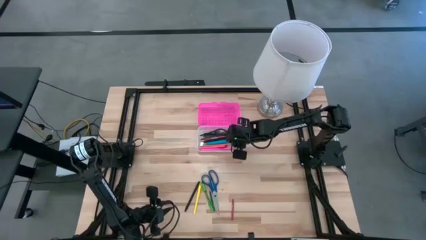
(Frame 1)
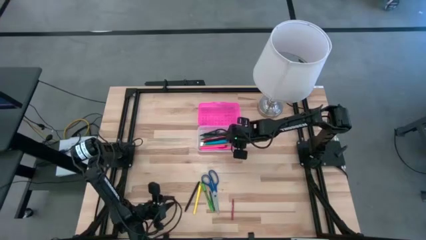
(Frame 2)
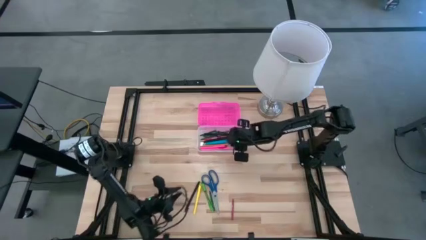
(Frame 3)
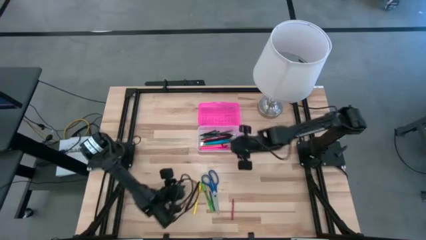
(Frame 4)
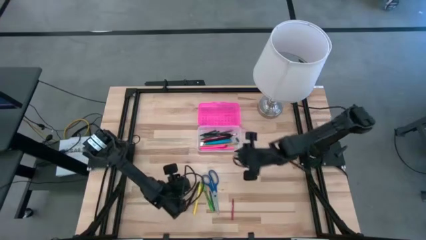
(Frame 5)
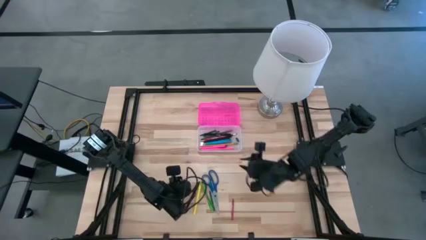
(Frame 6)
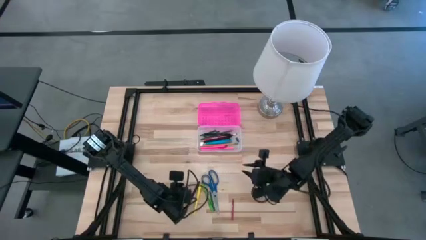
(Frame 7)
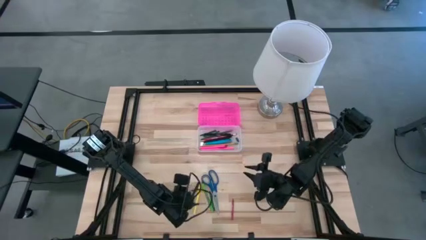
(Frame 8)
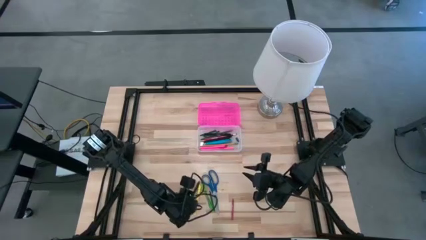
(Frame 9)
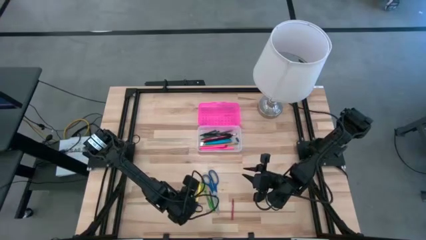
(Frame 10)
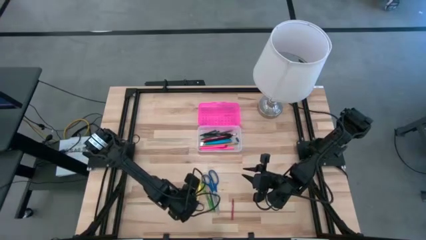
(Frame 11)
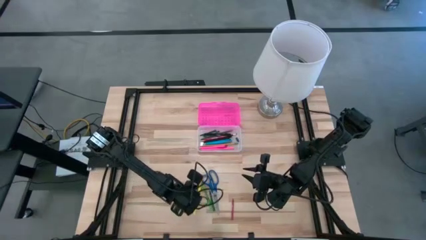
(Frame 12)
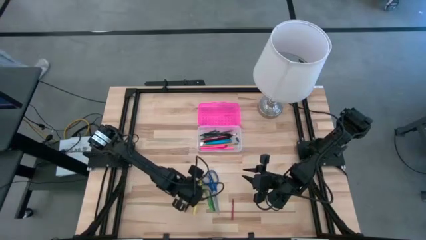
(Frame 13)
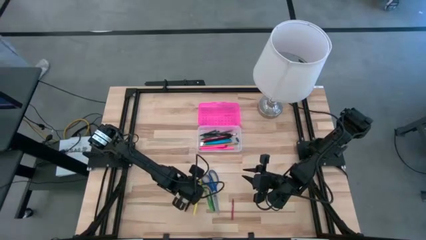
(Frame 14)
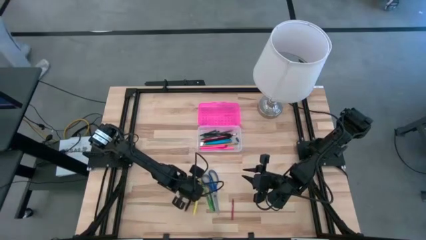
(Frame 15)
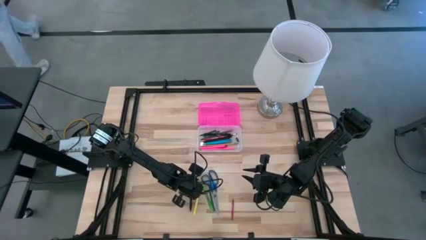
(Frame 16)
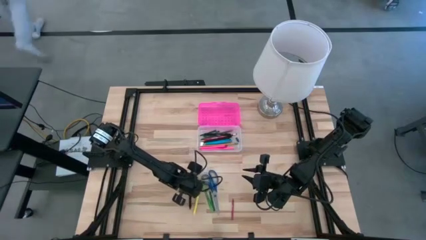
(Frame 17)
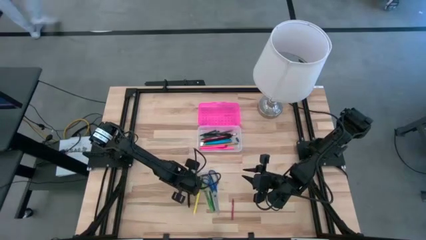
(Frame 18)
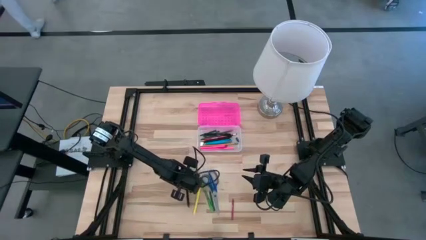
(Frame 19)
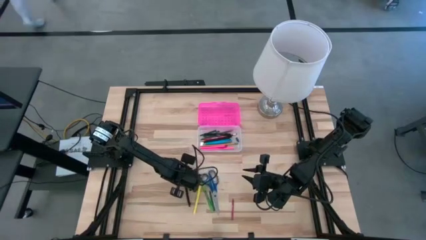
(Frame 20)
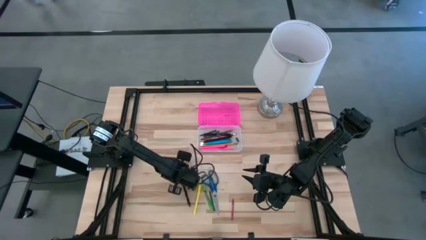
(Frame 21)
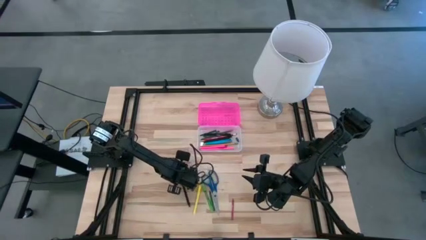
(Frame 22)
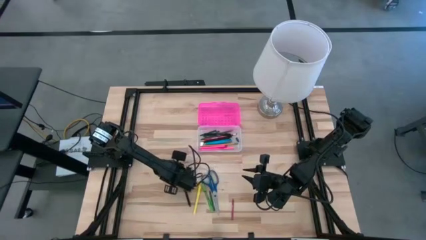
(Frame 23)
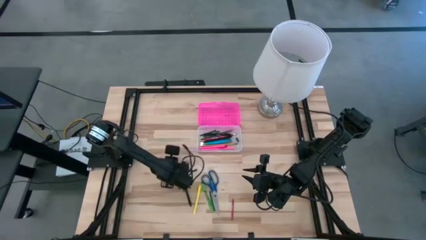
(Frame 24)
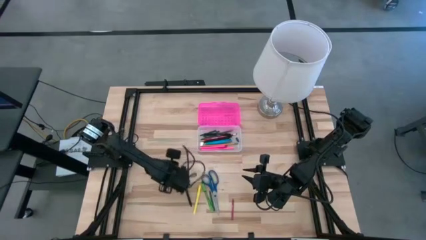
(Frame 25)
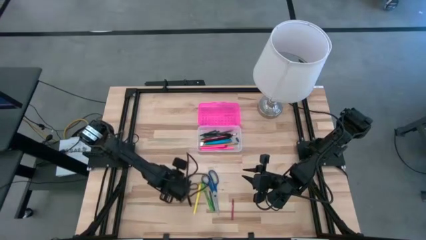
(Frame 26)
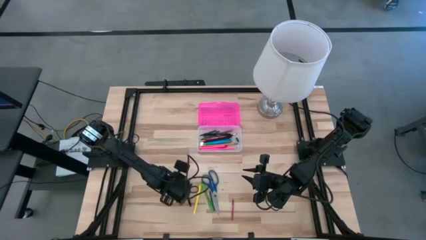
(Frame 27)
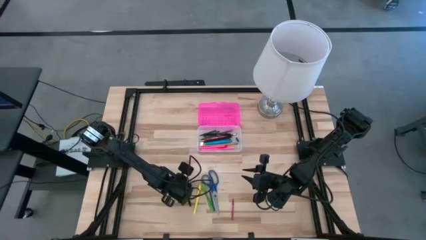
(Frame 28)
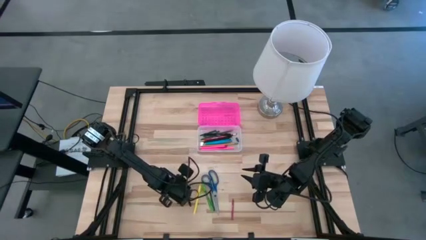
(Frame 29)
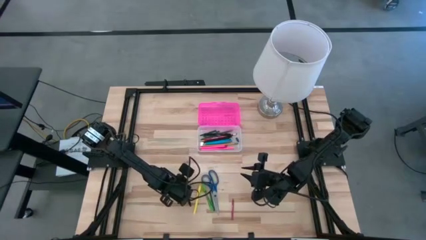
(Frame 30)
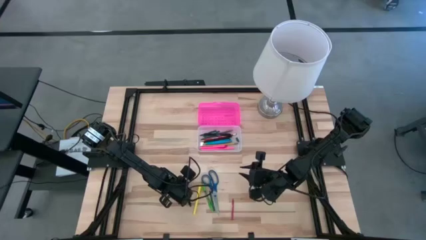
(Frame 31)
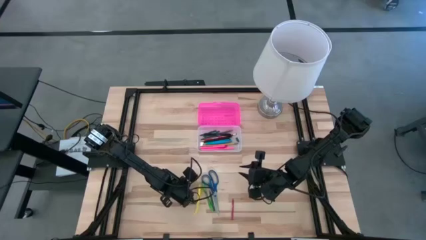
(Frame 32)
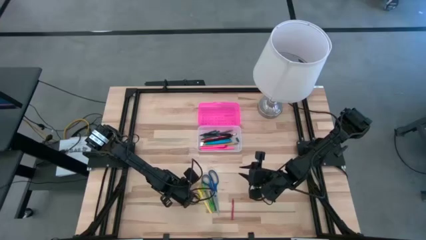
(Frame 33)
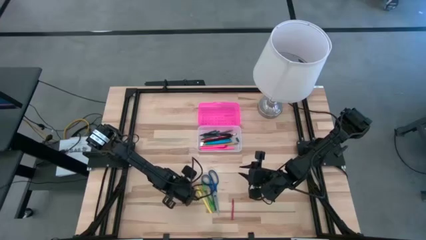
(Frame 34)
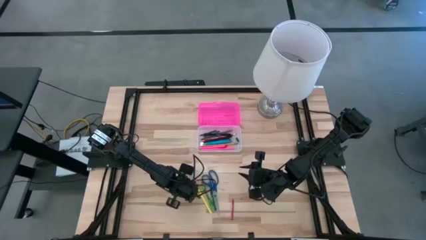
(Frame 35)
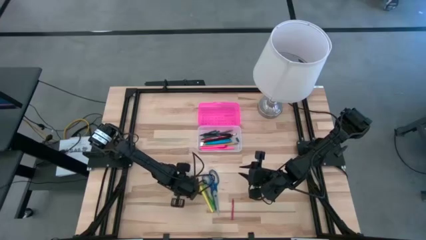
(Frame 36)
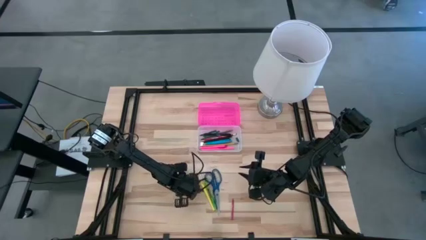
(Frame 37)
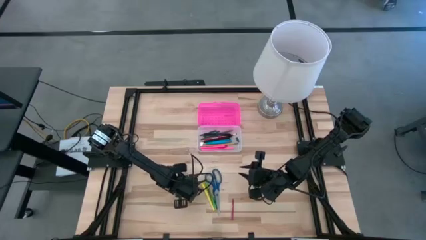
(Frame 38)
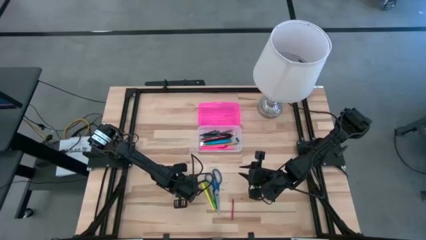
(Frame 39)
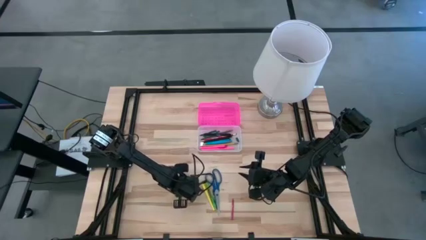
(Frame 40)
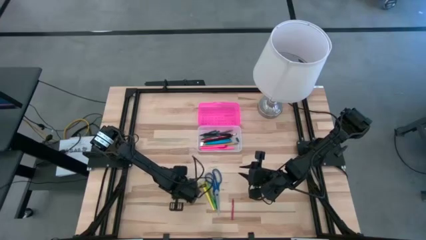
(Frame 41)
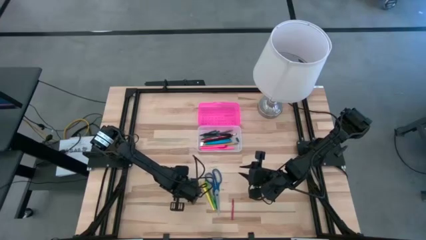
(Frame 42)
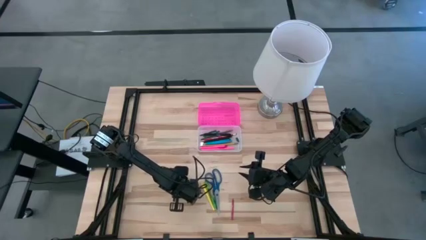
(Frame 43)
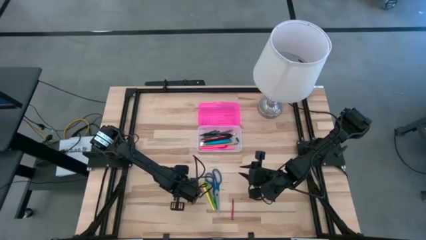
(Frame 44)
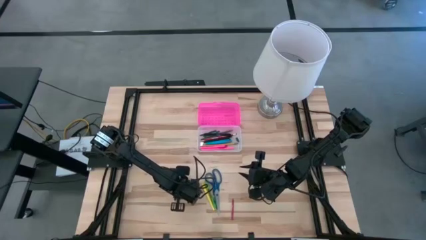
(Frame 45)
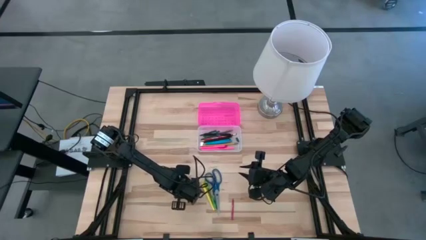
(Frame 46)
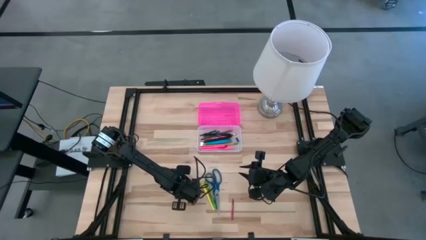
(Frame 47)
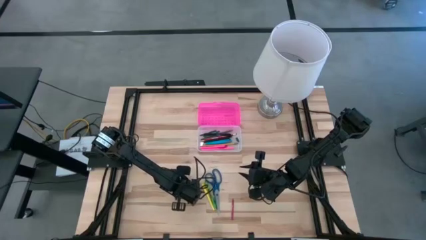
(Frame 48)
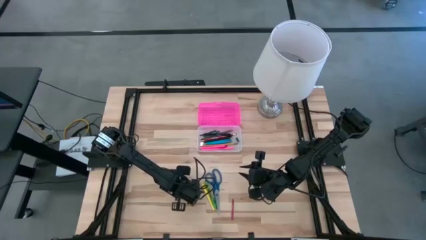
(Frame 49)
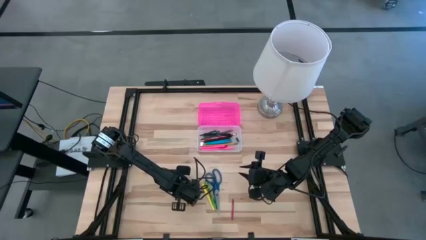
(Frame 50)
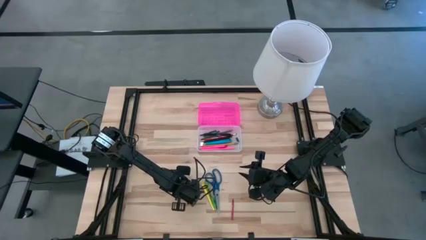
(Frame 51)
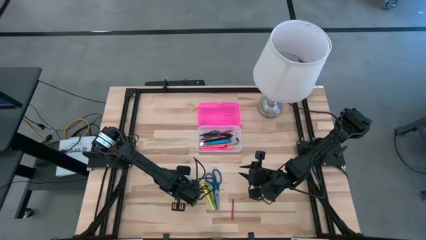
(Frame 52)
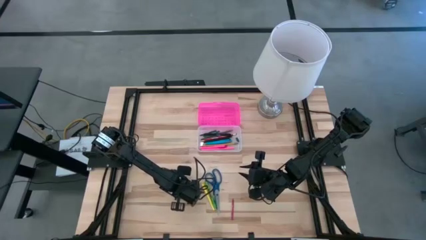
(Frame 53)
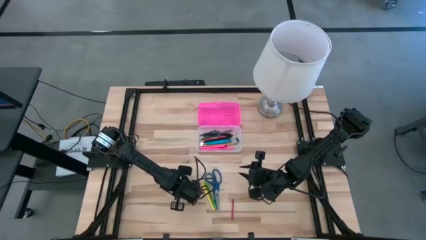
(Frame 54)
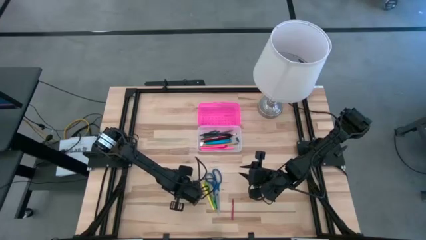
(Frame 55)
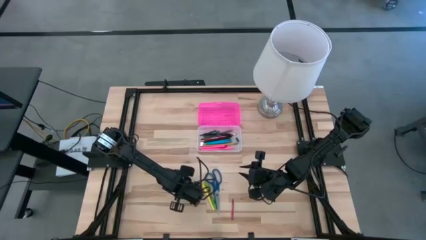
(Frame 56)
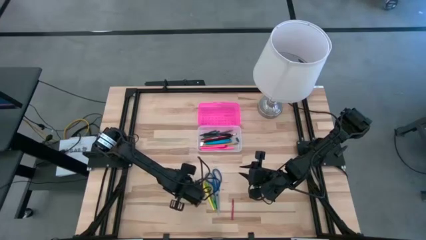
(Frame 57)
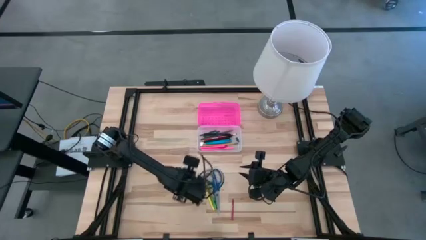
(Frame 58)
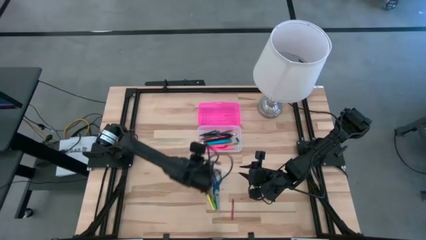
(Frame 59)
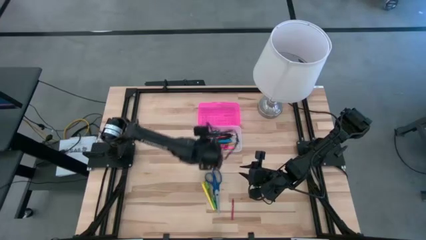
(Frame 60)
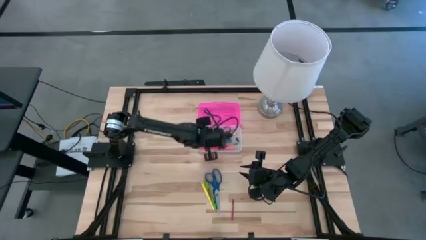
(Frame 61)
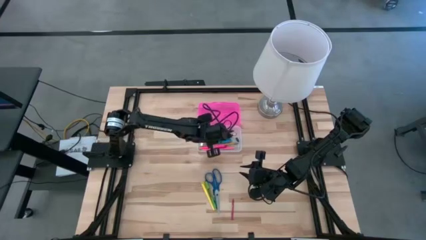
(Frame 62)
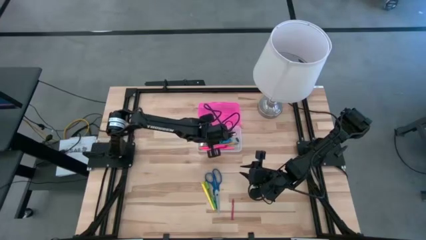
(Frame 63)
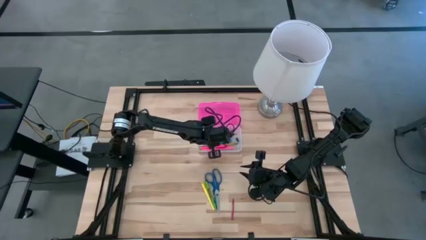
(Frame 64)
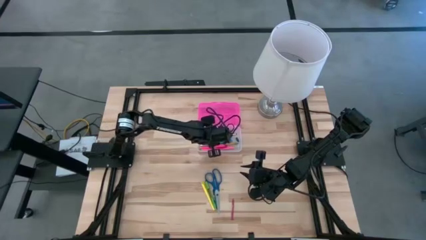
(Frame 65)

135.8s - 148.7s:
Task: Pick & place school supplies into a supply box
Put the black pen into the supply box

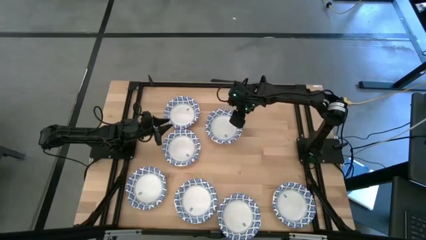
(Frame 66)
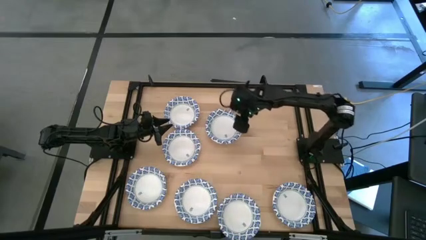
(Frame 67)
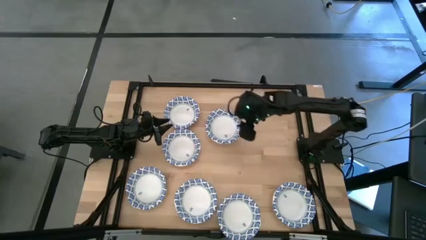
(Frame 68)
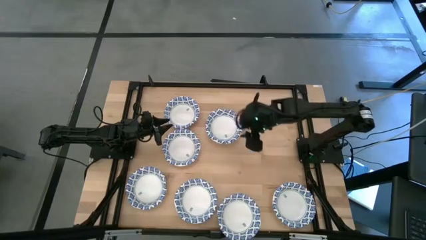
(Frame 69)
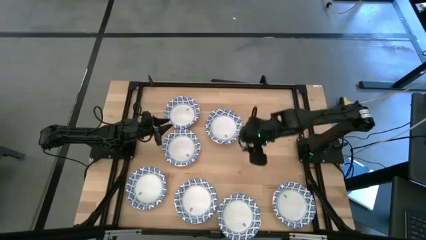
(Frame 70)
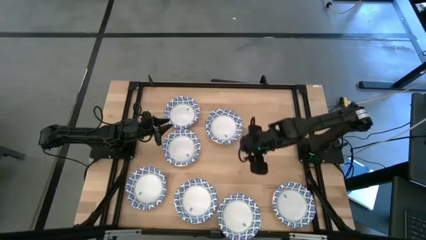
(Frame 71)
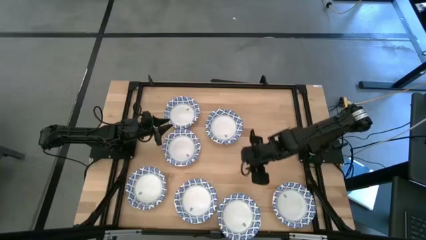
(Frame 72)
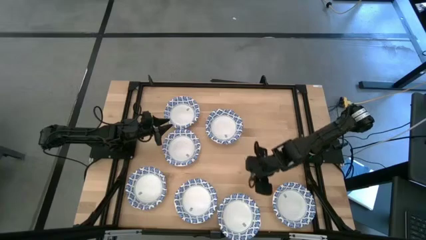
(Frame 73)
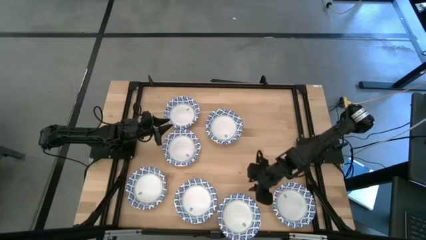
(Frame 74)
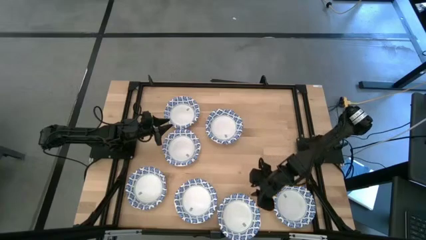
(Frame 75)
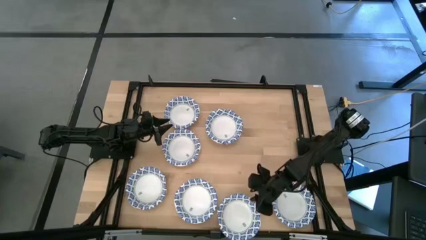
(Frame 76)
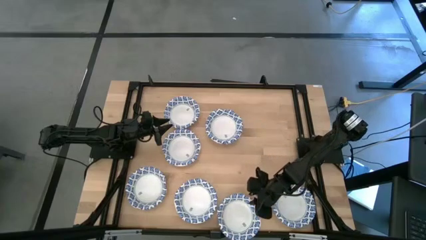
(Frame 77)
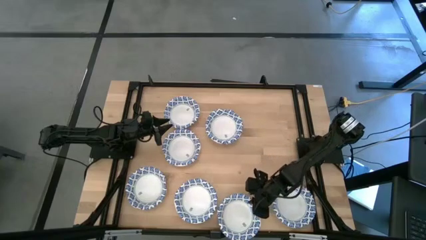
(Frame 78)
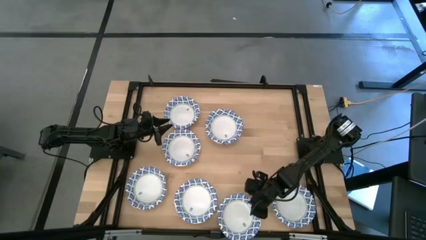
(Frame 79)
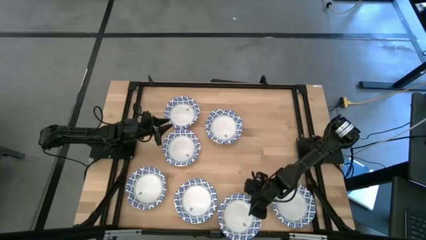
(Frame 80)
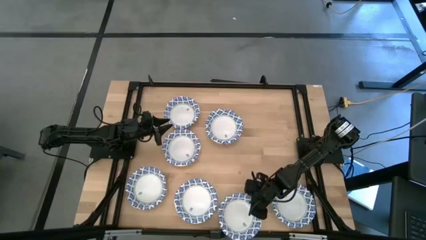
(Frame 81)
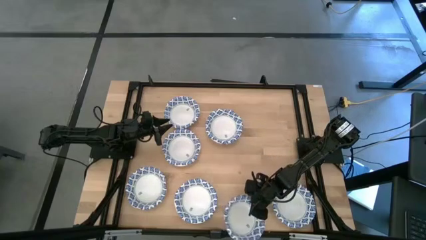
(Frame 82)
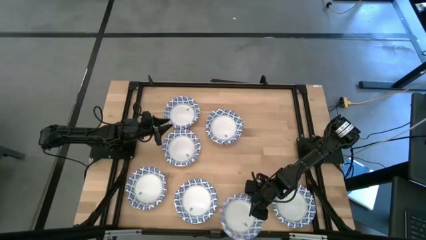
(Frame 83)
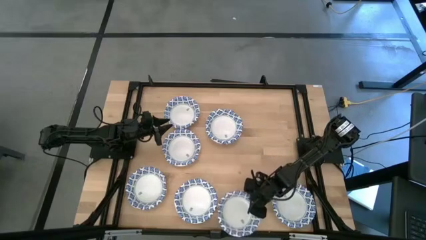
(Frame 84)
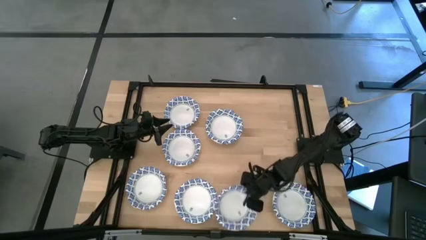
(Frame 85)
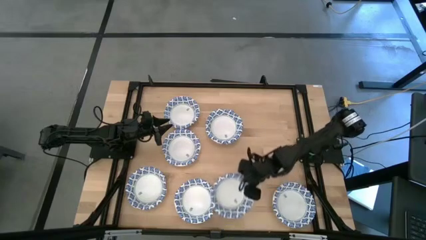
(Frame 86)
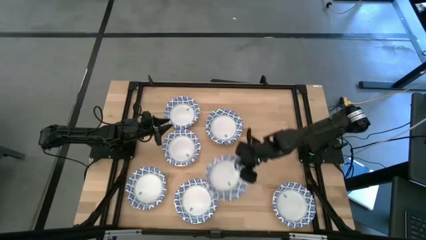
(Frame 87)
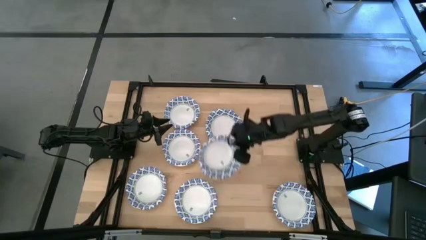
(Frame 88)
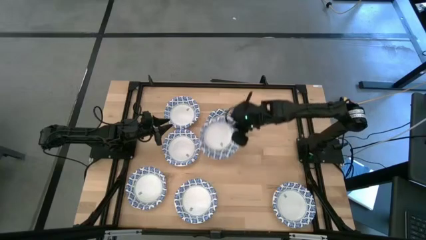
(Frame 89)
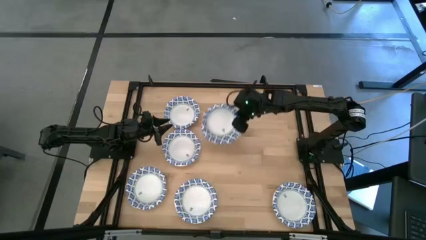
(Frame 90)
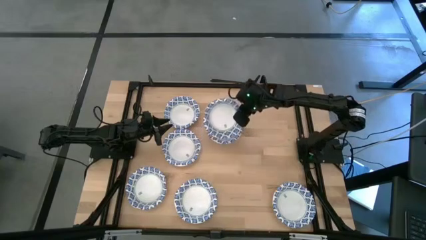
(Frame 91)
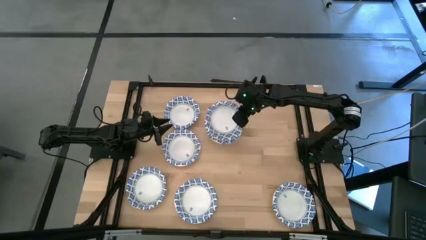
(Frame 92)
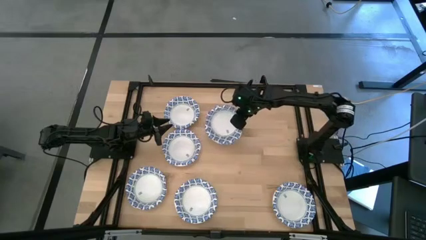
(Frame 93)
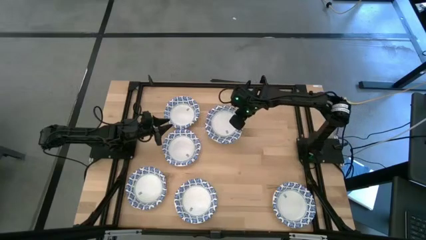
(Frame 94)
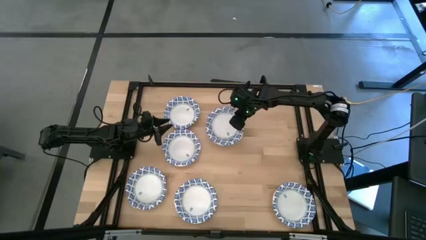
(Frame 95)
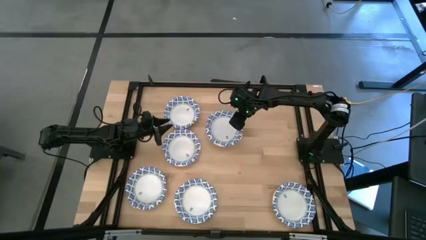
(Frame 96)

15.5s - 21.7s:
Task: Nest bowls inside each other
Stack the blue patterned bowl on top of the other blue patterned bowl
